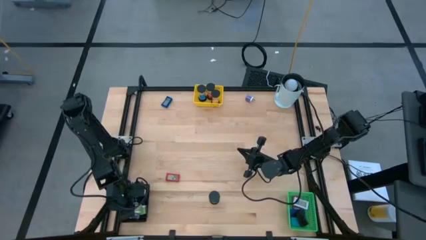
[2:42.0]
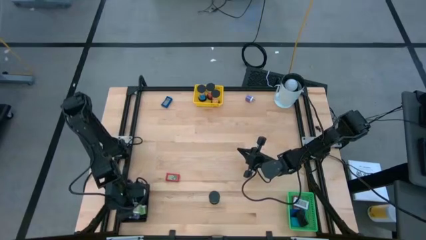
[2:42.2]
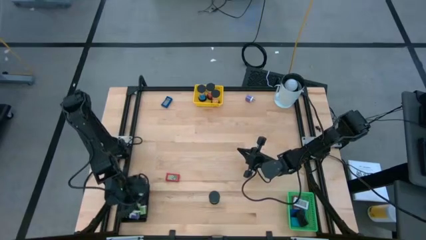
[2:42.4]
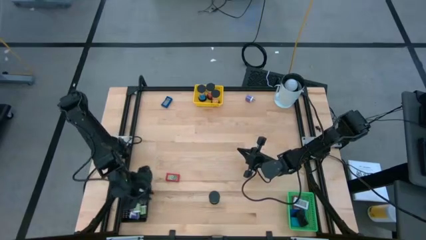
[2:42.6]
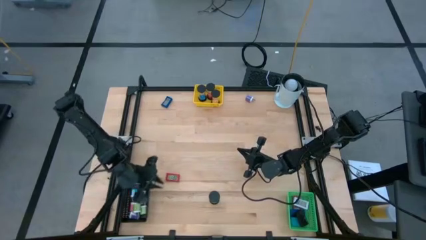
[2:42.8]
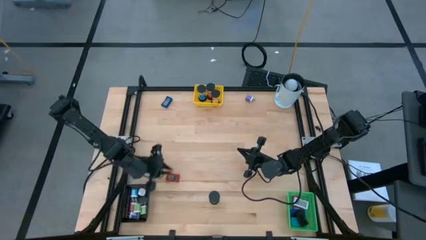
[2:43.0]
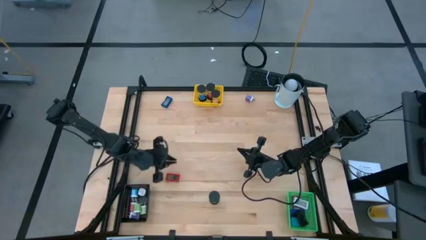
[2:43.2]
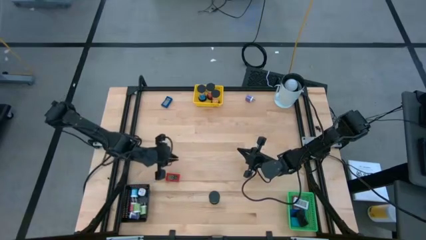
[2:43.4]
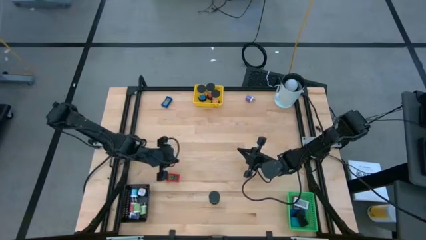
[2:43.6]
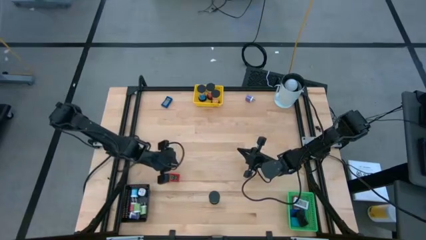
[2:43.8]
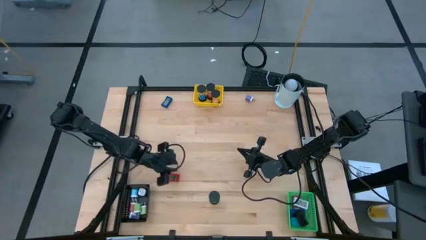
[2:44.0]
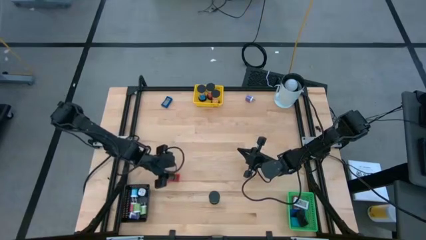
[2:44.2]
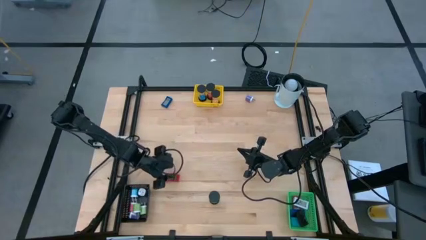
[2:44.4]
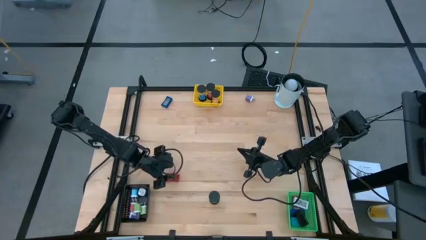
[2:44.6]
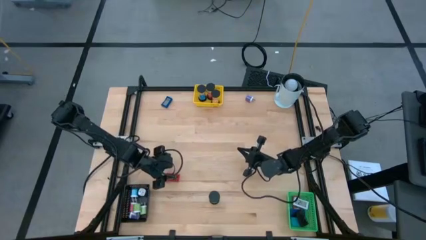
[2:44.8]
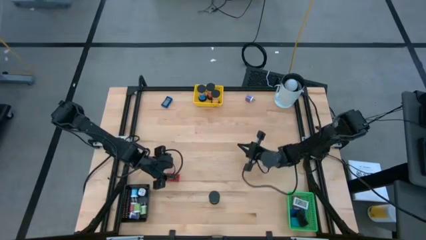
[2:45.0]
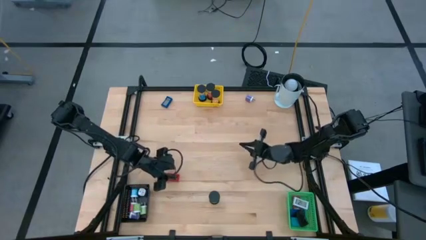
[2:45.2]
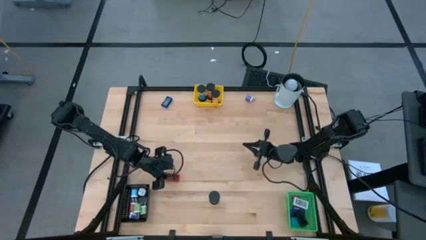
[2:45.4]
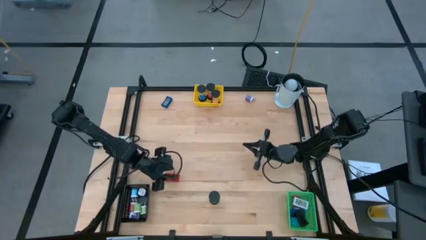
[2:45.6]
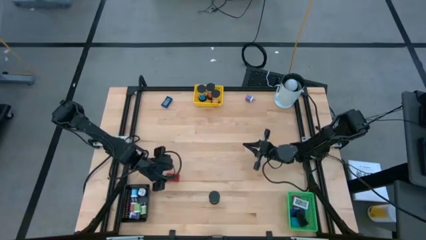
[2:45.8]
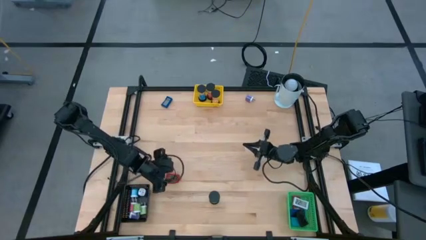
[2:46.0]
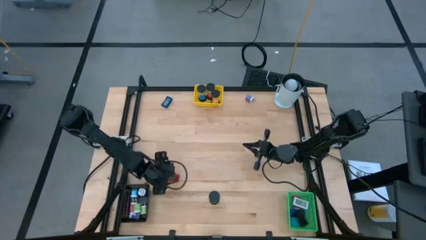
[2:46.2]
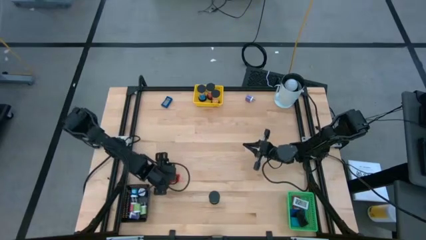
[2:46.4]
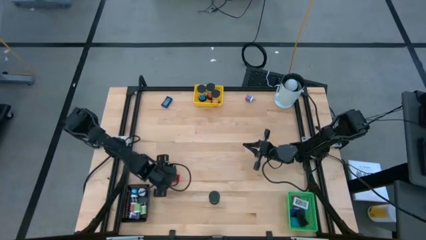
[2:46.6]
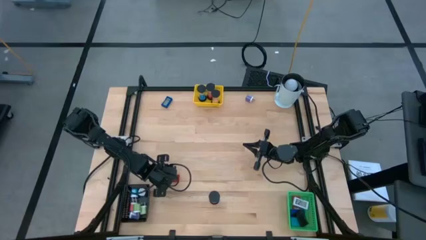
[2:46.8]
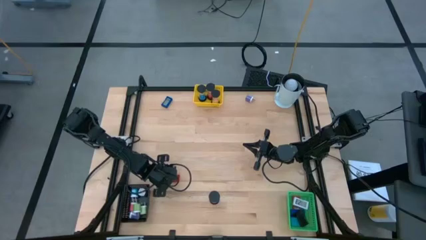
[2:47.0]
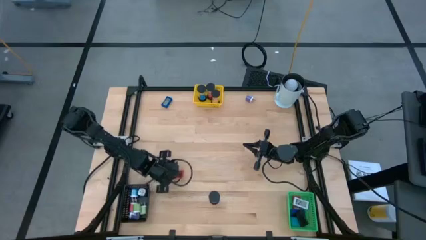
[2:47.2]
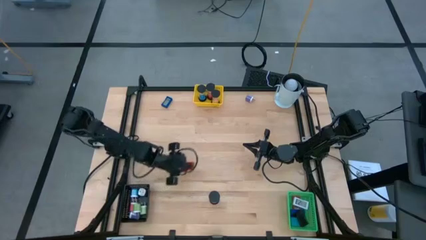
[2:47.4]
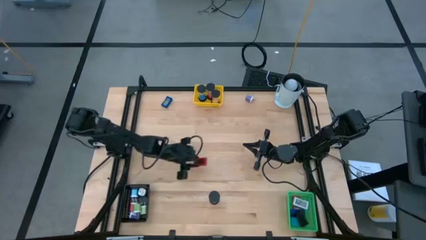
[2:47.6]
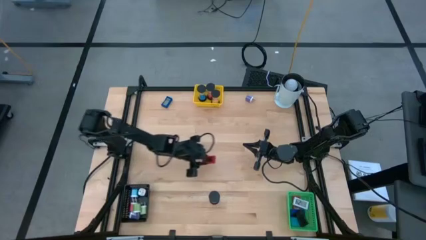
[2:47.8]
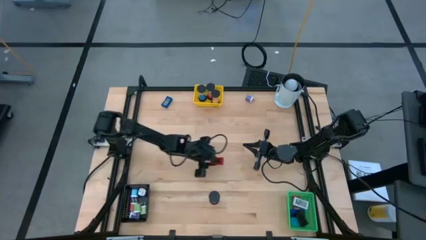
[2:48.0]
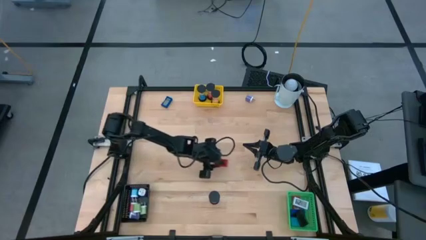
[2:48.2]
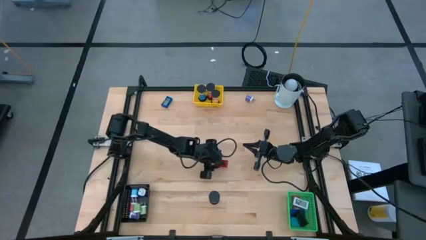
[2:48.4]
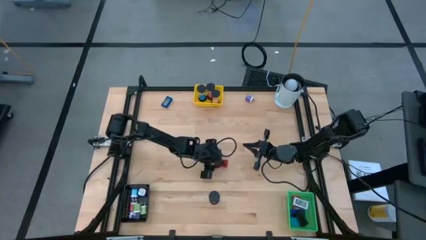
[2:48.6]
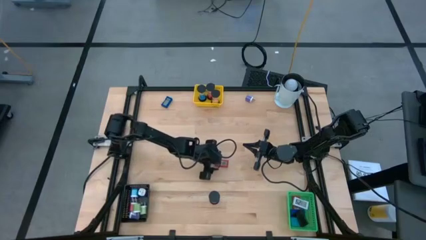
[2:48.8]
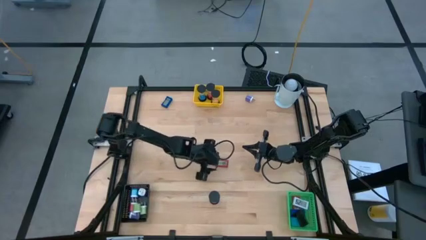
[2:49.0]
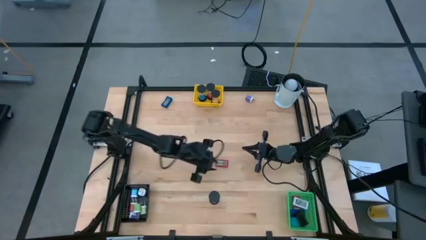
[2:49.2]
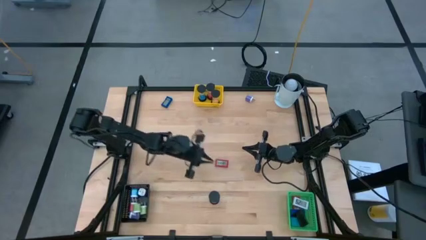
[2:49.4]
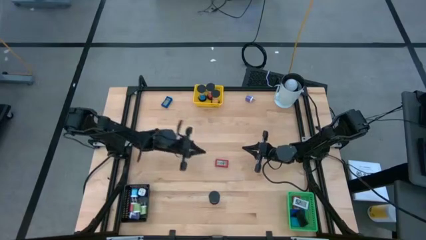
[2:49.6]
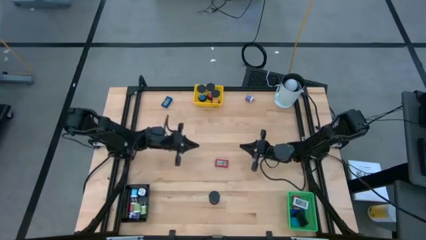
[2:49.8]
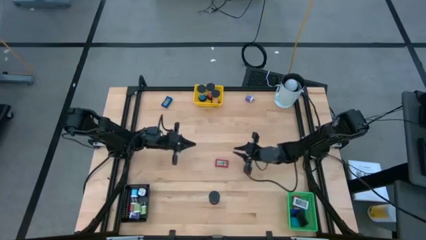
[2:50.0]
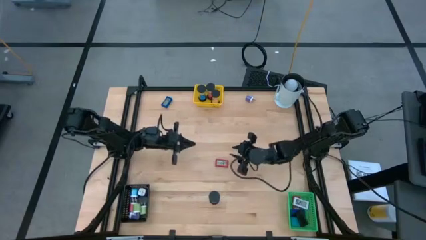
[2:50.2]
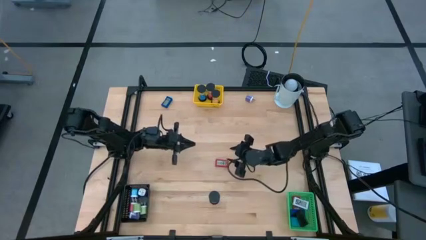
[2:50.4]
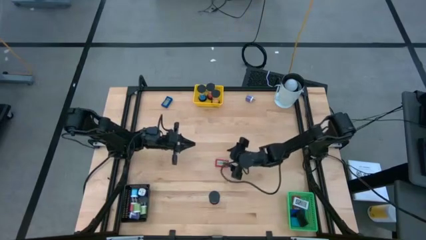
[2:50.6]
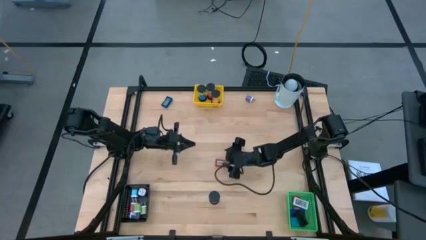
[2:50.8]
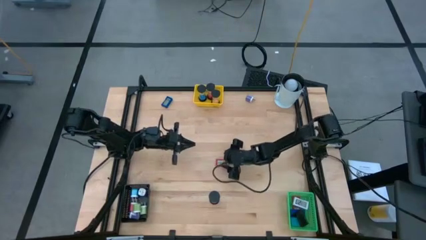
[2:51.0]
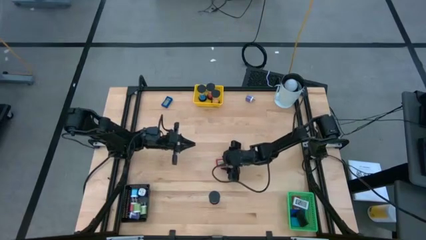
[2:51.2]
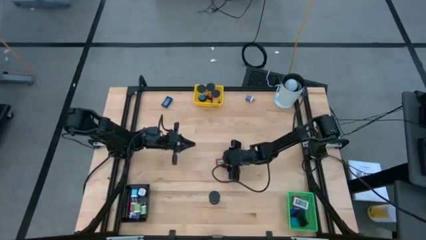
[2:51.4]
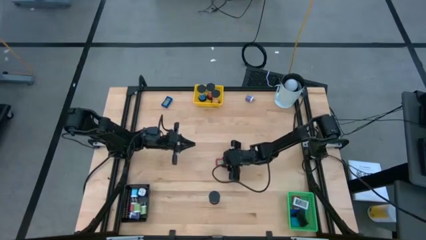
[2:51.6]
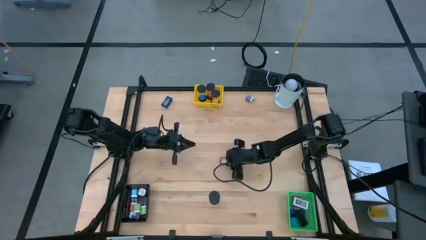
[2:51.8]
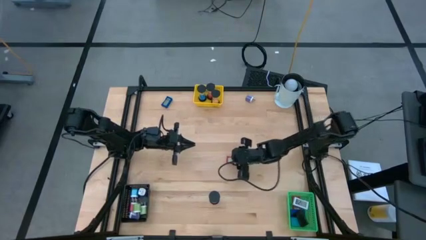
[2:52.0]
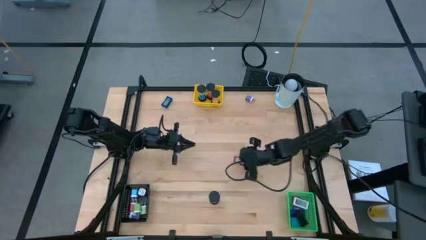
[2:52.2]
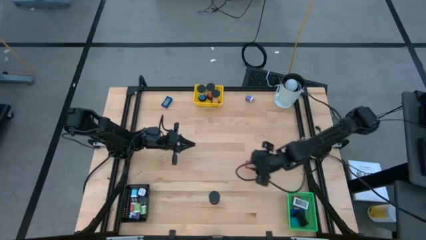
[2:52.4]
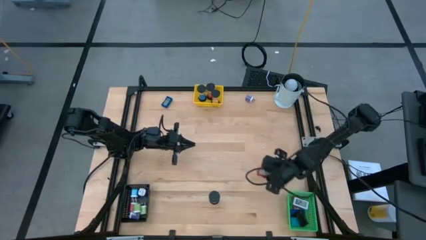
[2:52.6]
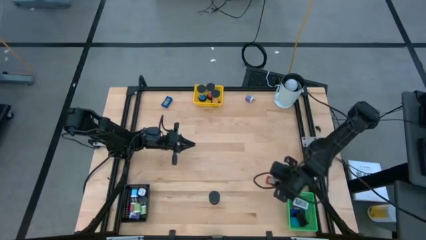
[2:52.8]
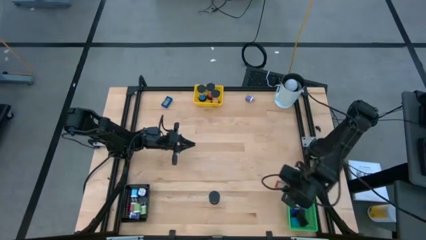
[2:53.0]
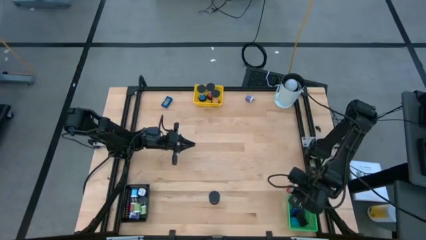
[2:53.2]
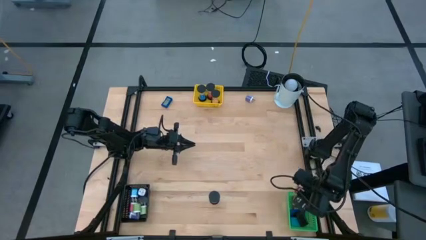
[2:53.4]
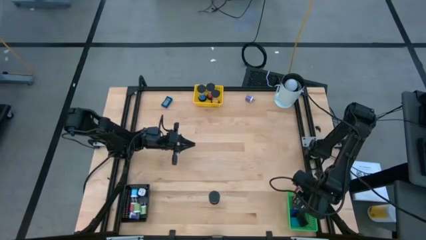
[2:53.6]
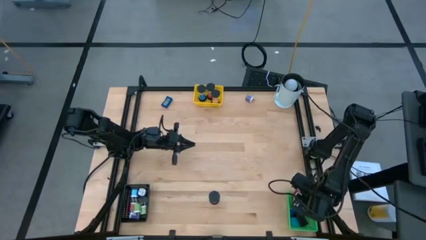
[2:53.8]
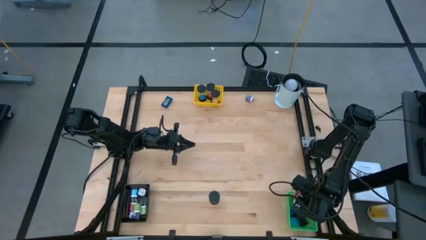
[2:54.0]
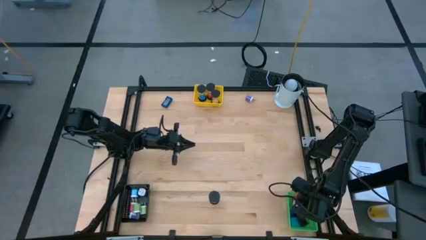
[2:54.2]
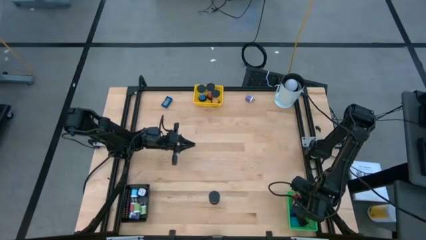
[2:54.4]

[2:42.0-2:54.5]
Task: Pick & Place Office items
Put the red charger adapter into the green bin

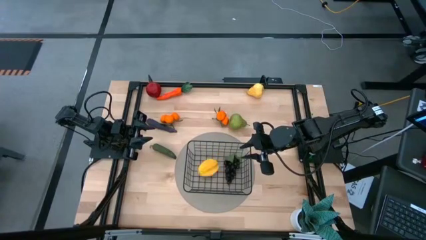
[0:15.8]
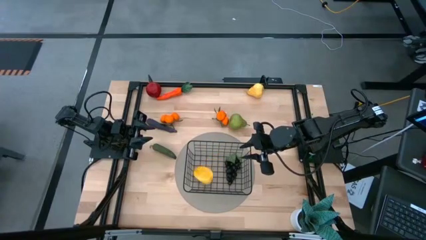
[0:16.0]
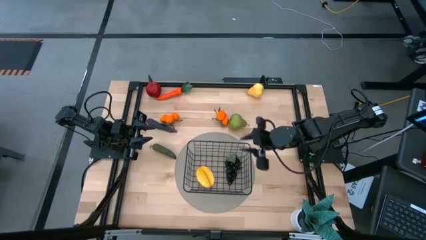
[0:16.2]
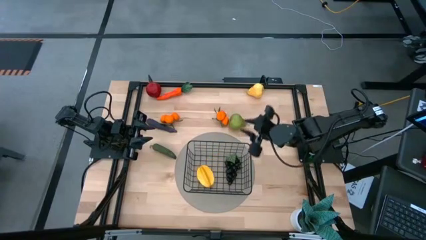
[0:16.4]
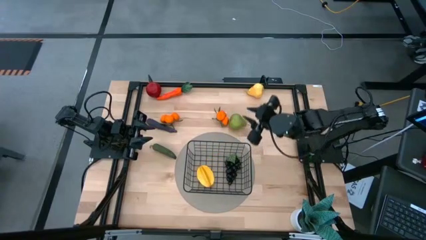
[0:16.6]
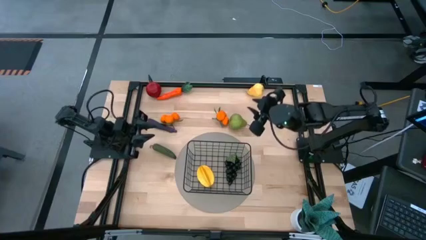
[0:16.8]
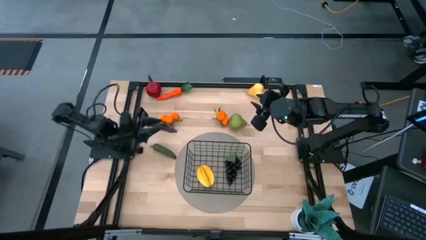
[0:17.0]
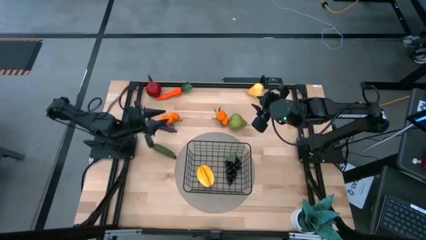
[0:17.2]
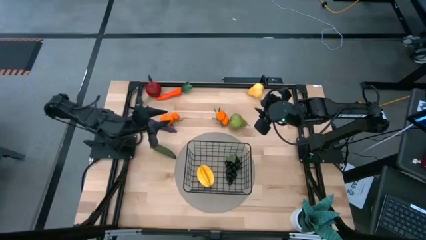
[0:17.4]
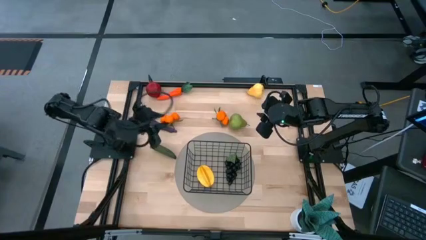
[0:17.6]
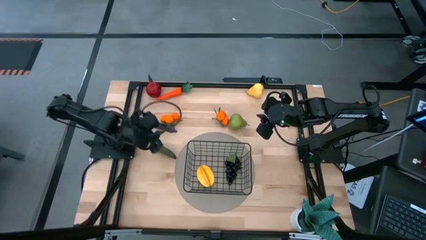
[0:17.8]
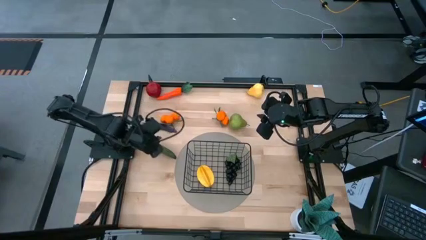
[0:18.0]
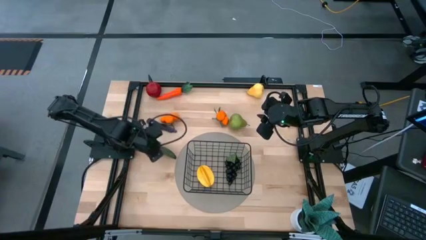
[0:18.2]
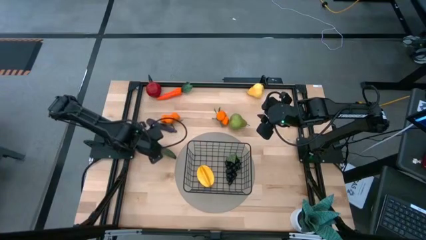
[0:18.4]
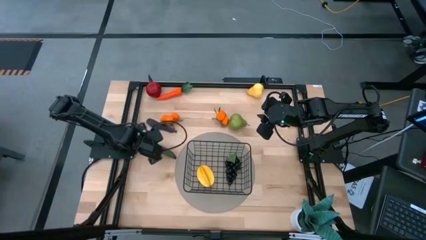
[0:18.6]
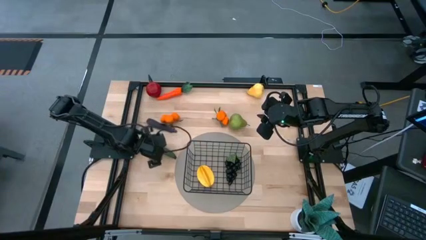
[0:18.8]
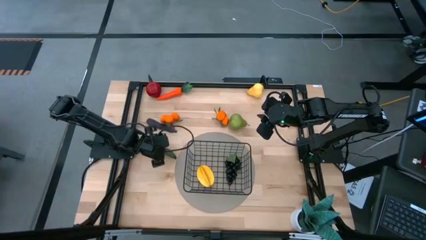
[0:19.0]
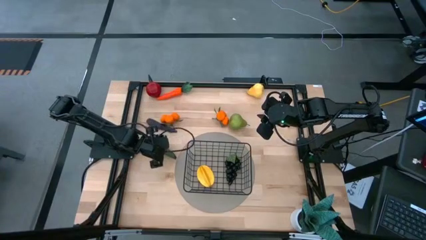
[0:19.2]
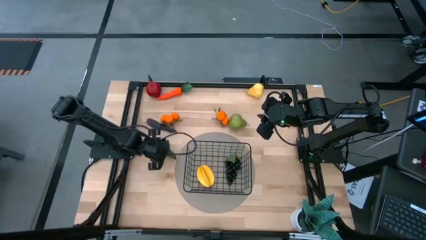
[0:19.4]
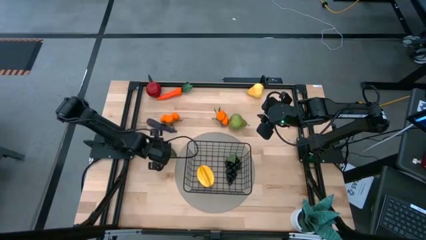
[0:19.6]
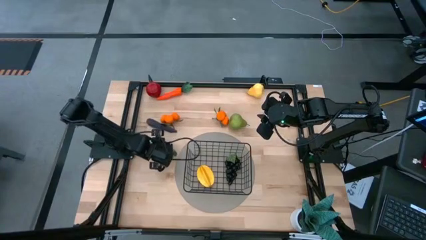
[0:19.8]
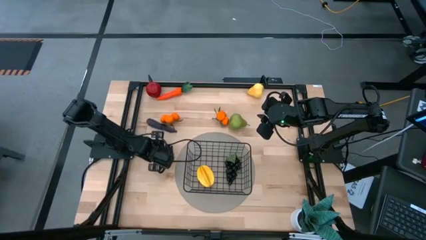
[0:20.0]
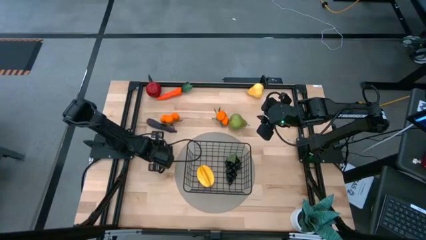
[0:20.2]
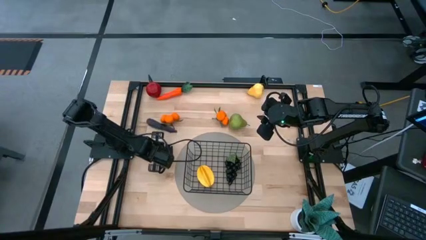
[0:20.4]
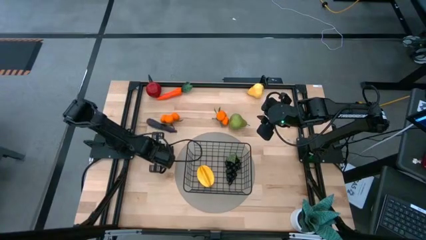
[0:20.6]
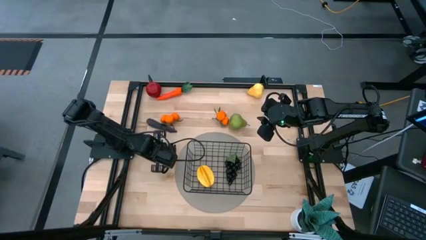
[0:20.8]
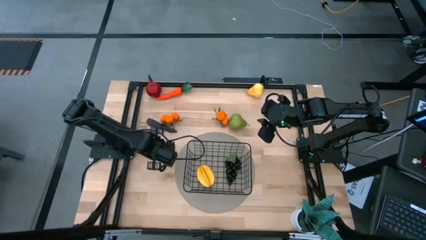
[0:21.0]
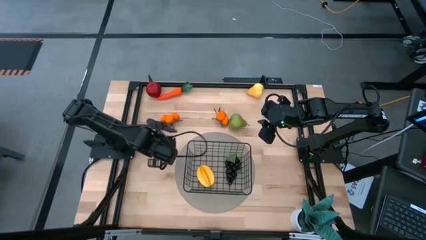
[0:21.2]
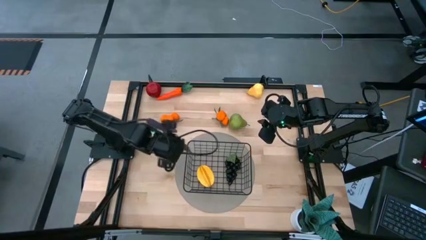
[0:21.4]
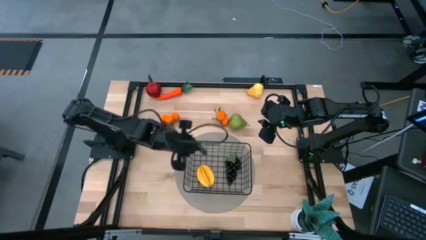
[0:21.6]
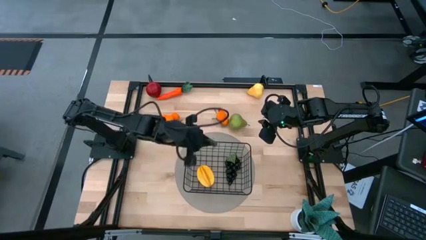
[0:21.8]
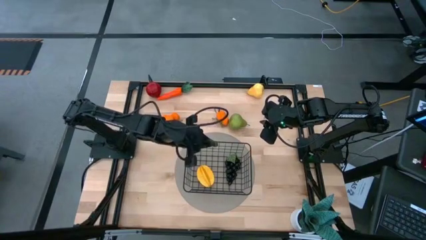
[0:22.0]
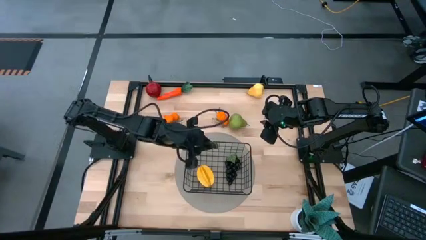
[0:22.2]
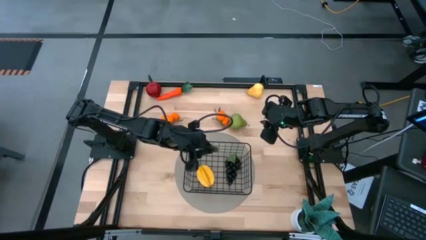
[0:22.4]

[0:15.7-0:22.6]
Task: Build produce basket
Put the chili pepper into the wire basket
